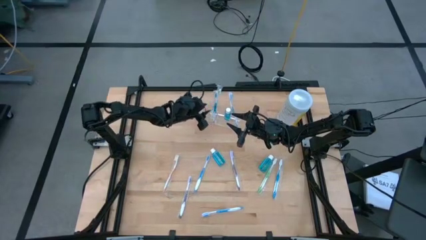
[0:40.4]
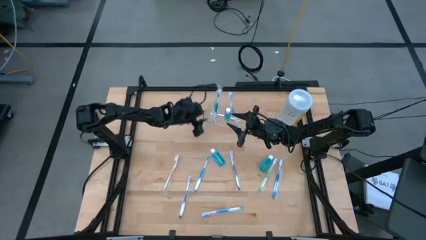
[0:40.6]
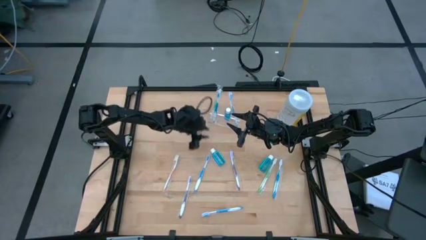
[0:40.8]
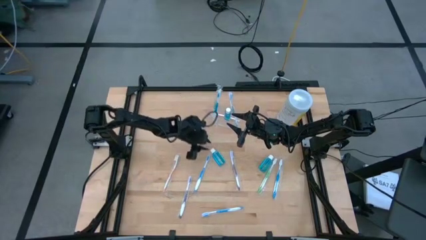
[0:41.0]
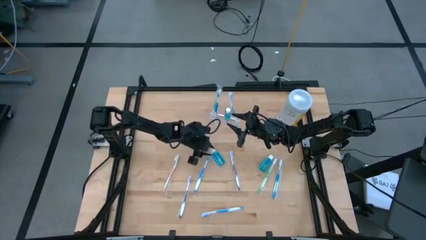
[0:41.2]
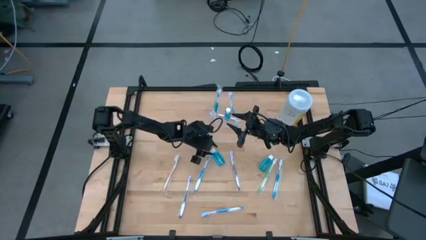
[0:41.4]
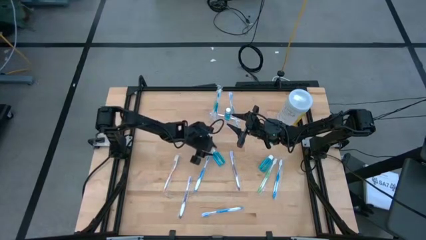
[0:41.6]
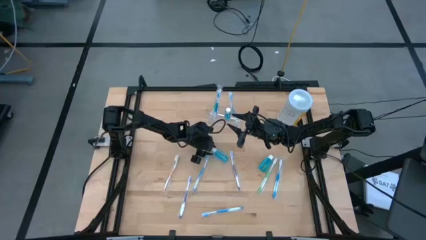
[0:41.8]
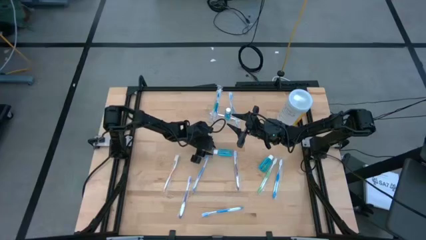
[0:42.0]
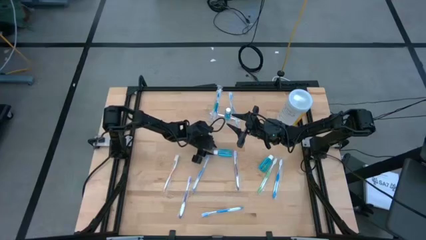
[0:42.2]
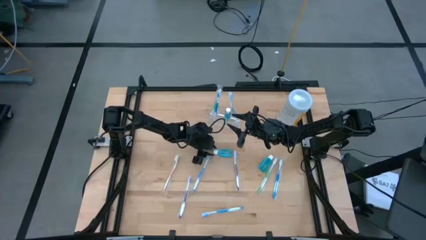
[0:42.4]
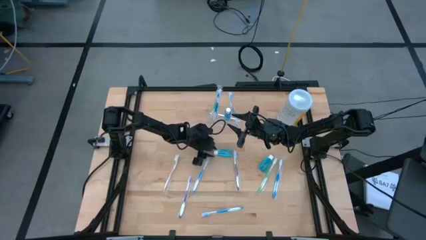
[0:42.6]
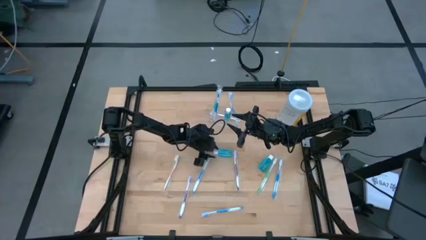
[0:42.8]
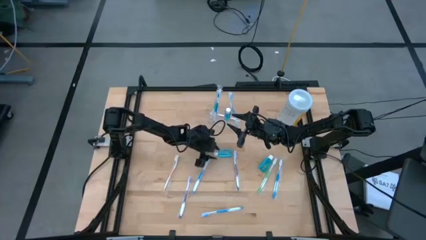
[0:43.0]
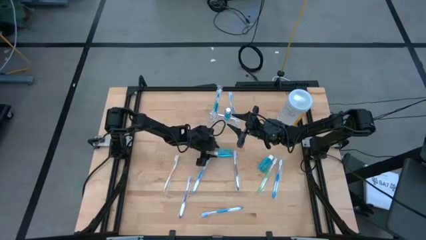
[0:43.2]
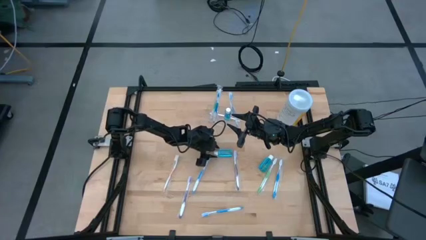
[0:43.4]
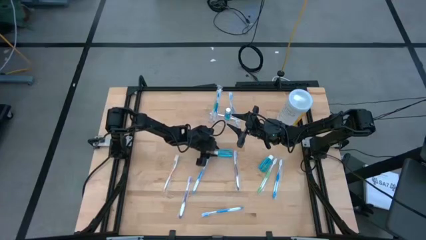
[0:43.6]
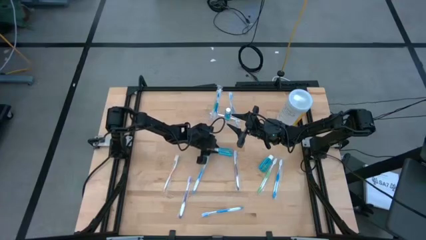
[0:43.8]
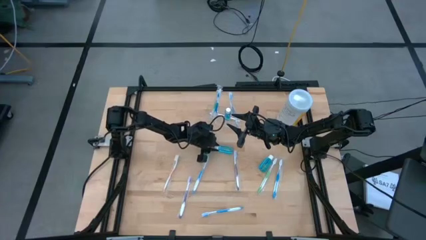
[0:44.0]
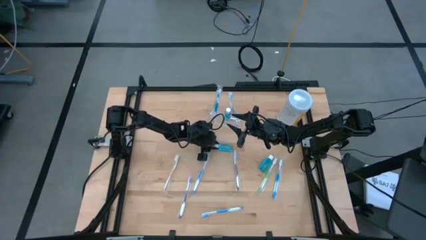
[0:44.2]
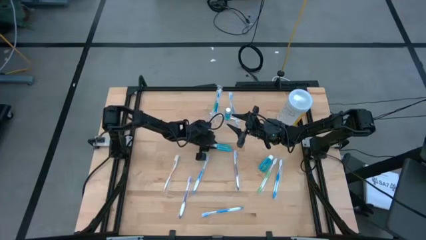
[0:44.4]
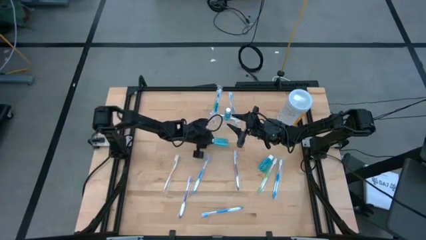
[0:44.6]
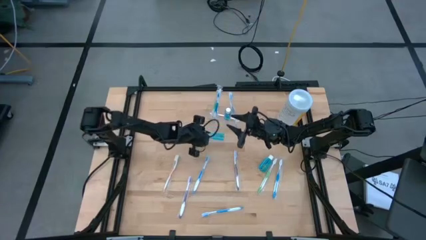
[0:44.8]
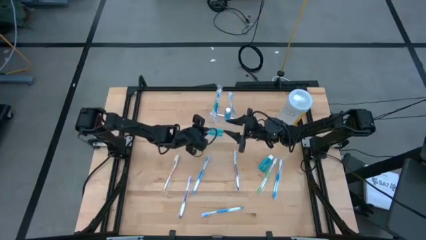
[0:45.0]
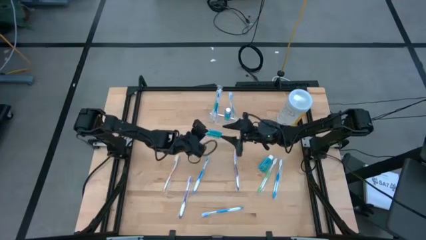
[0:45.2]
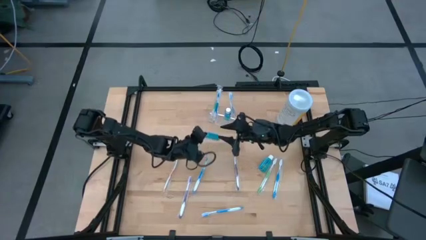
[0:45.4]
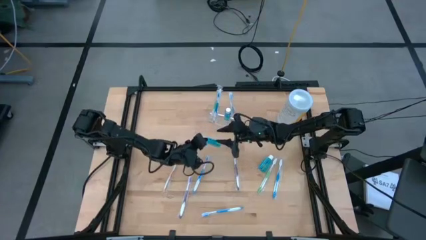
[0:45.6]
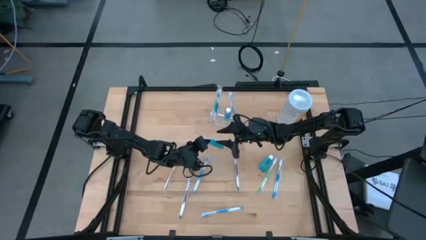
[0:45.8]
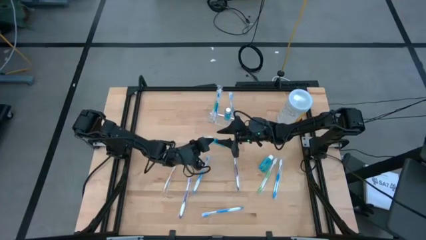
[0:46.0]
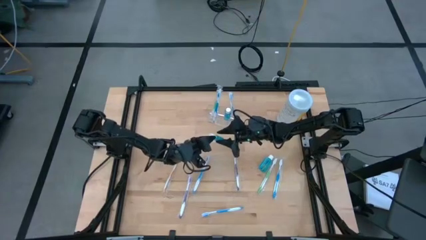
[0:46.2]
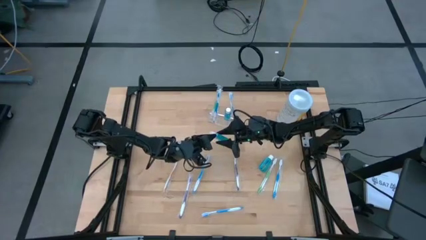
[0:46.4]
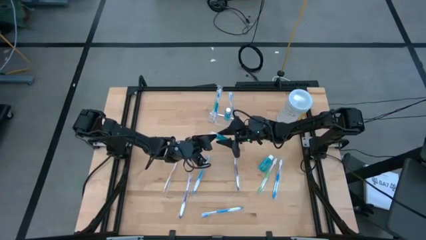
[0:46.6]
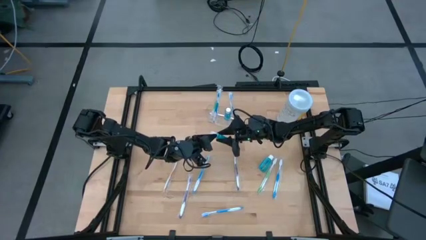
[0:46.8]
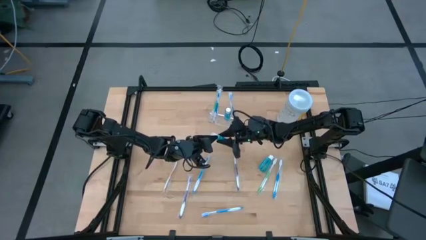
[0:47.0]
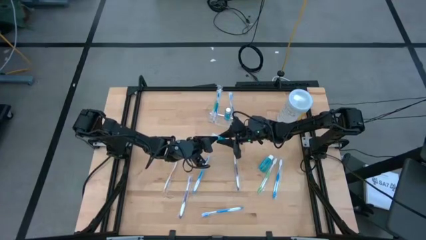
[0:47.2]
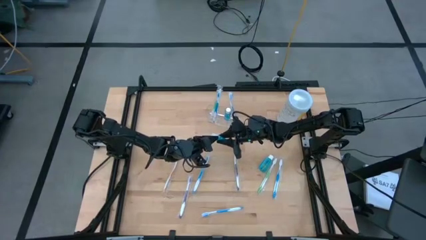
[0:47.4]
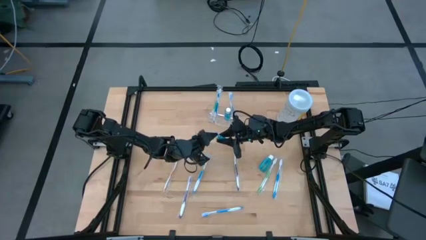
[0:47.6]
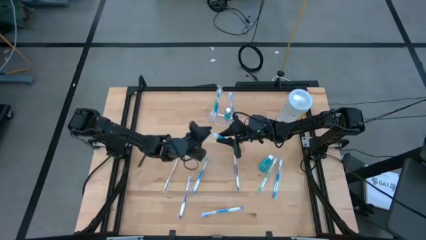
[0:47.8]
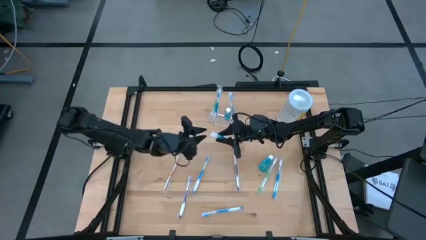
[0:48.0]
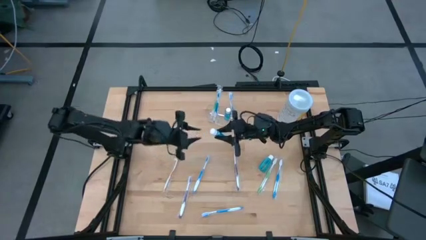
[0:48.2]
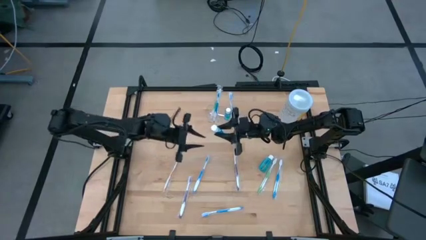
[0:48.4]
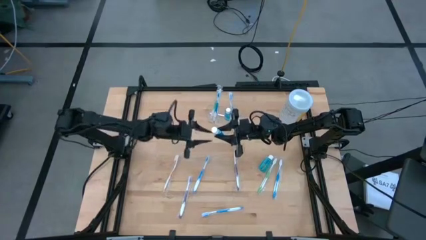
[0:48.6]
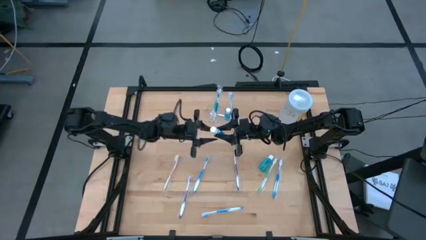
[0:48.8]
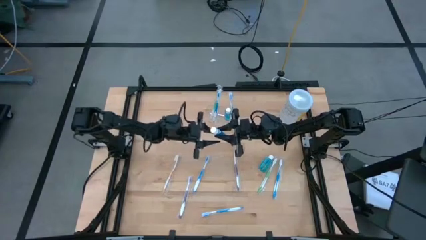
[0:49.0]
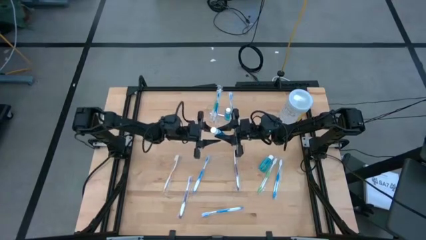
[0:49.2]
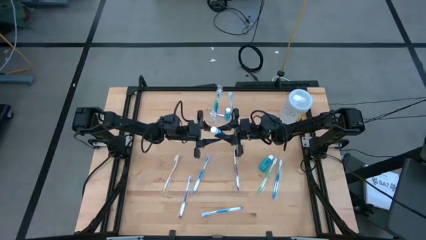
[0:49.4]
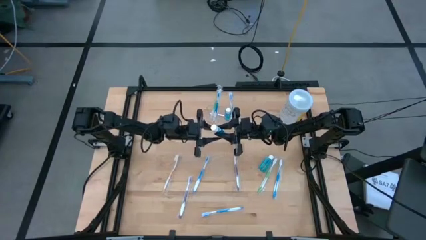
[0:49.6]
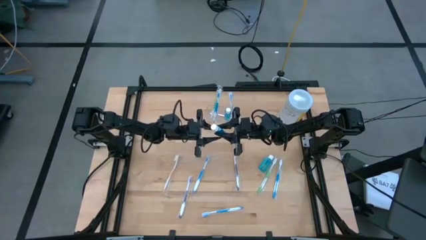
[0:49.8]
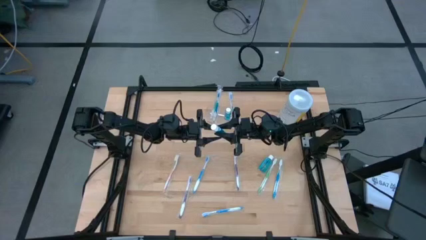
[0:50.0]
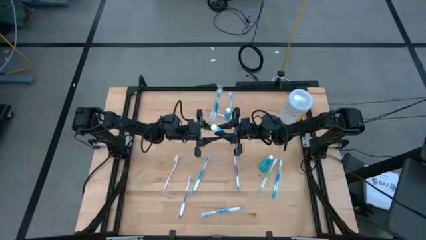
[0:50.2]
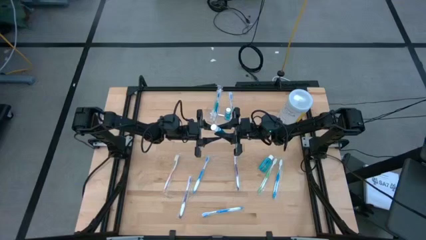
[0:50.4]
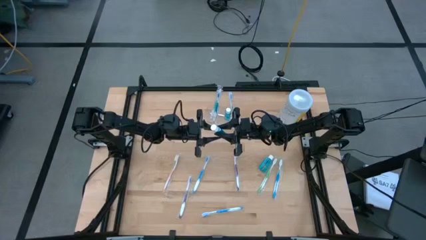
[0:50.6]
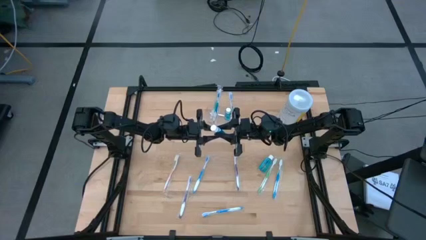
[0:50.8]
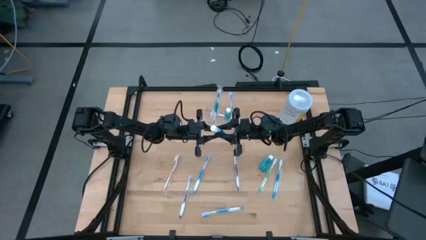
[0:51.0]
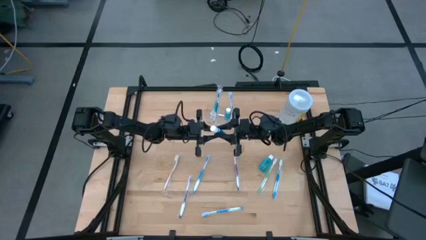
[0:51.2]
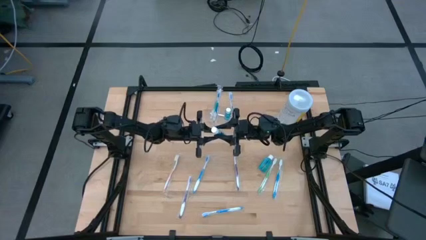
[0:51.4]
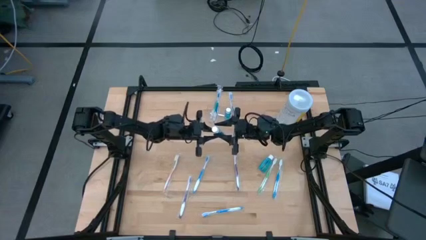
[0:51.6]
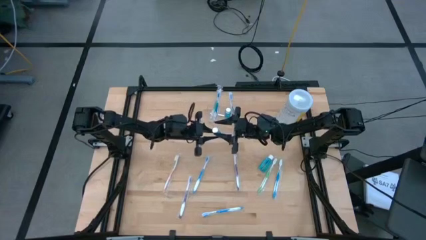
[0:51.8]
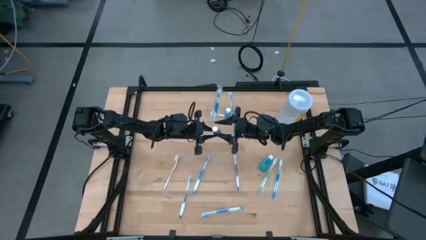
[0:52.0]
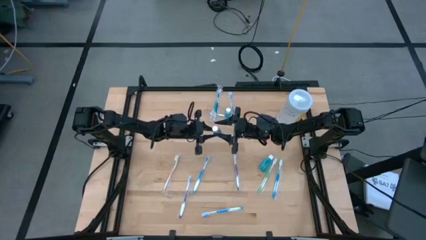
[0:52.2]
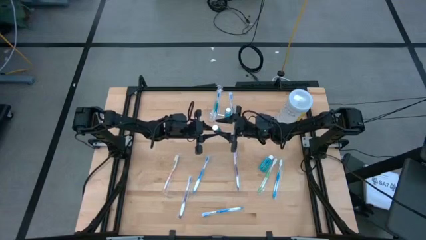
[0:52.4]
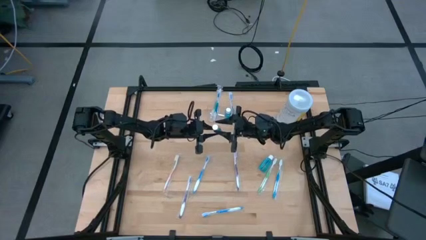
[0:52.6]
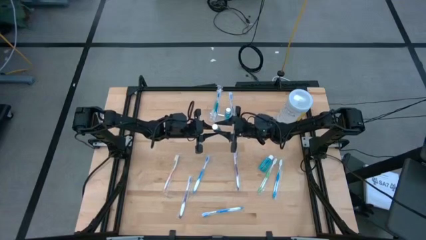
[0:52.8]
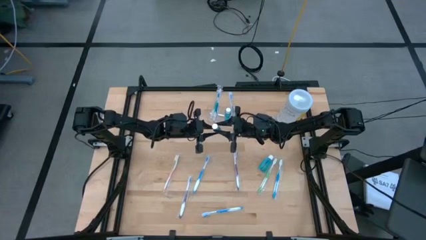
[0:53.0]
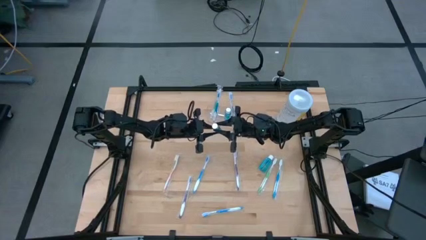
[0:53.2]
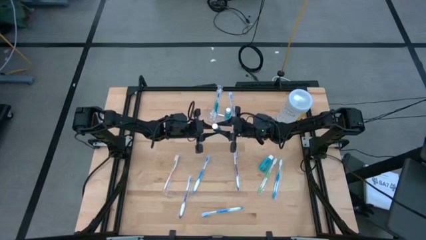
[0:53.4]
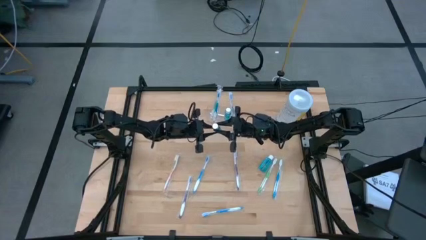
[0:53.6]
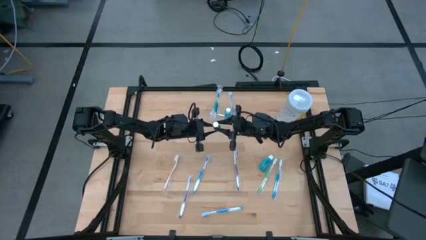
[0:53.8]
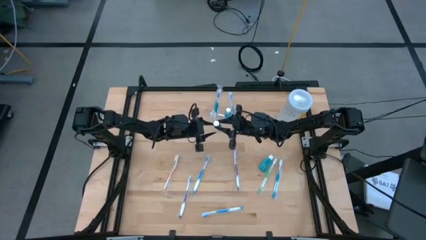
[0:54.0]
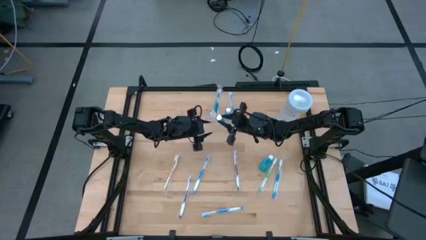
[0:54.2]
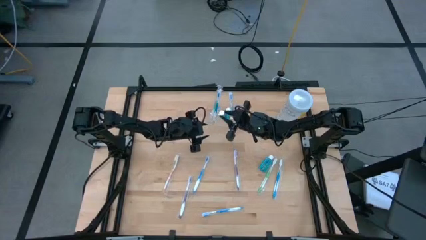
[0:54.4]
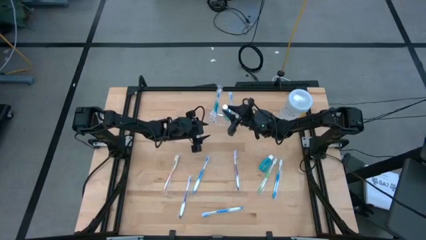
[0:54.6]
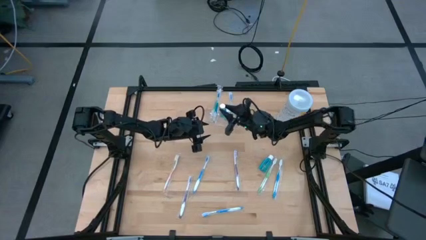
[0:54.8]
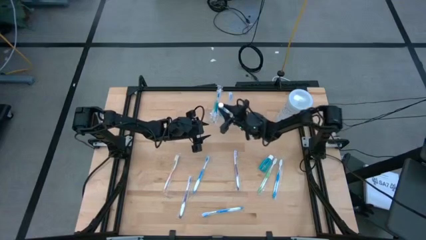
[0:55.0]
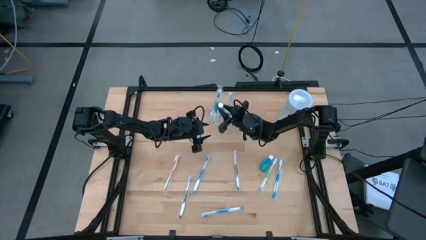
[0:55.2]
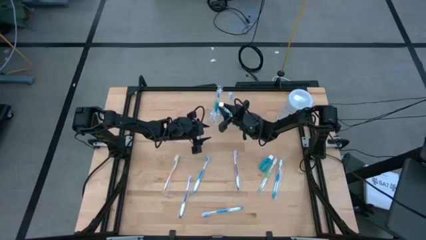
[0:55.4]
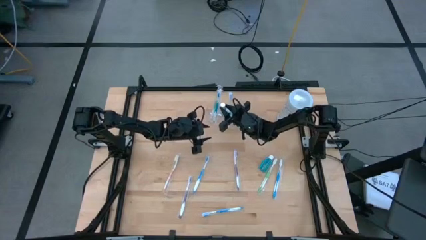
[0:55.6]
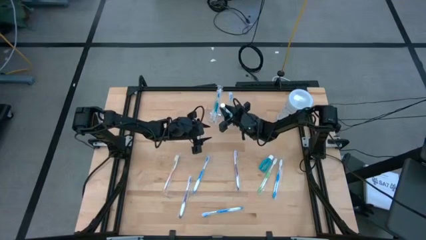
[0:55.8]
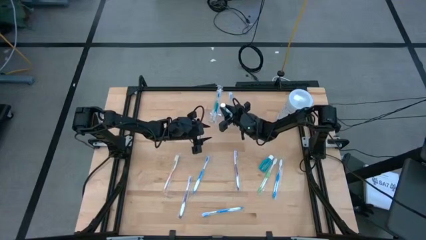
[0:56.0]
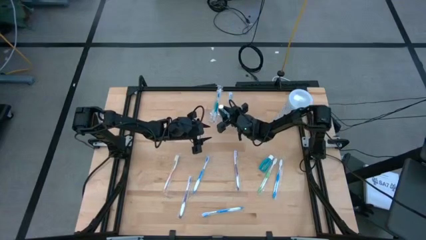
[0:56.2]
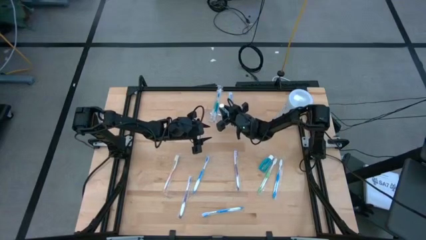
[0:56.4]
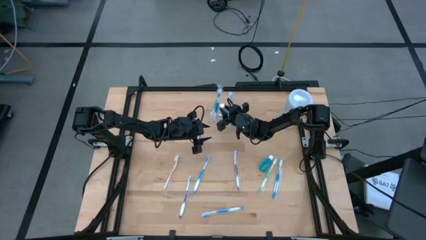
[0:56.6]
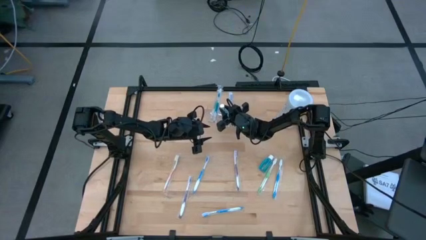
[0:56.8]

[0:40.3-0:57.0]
Task: Pick & Place toothbrushing station
Put the left mouthwash into the middle section of the transparent organizer
